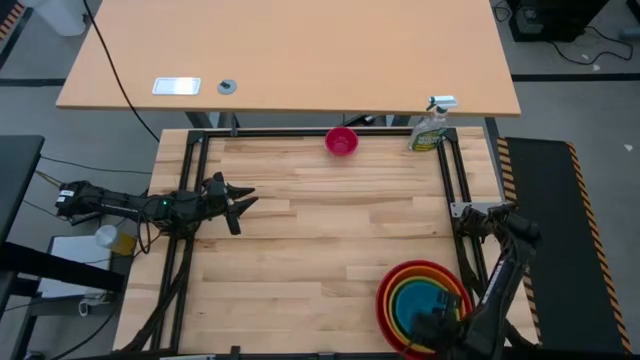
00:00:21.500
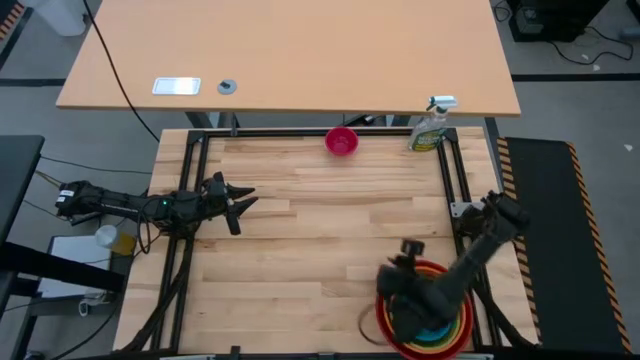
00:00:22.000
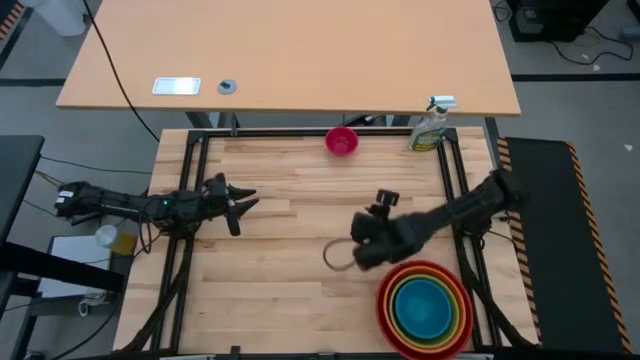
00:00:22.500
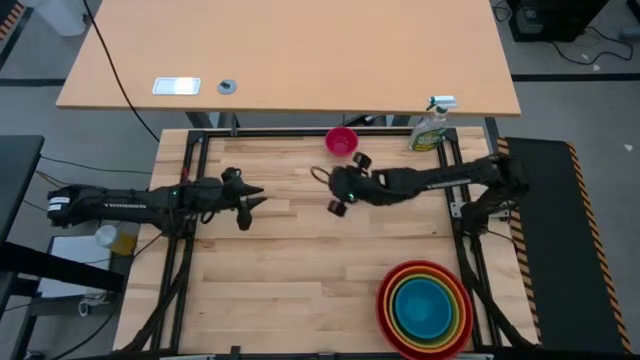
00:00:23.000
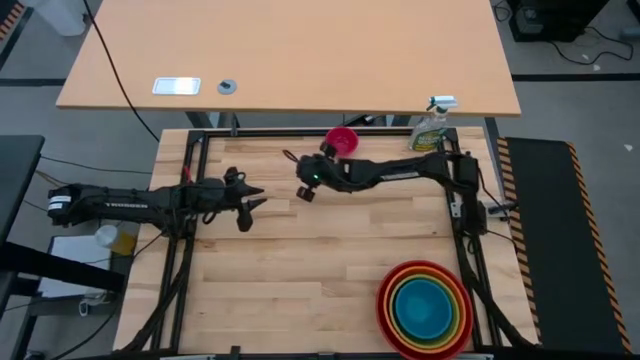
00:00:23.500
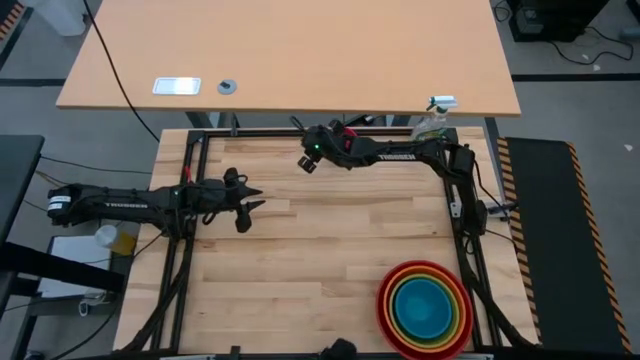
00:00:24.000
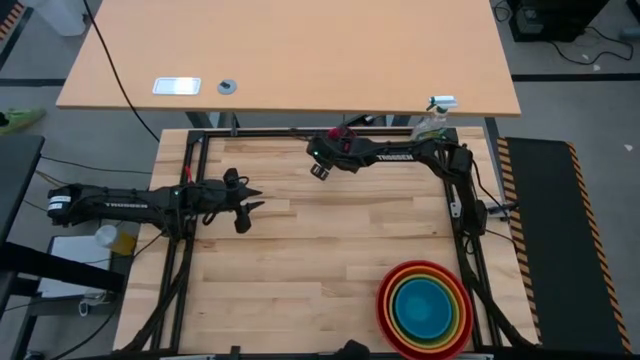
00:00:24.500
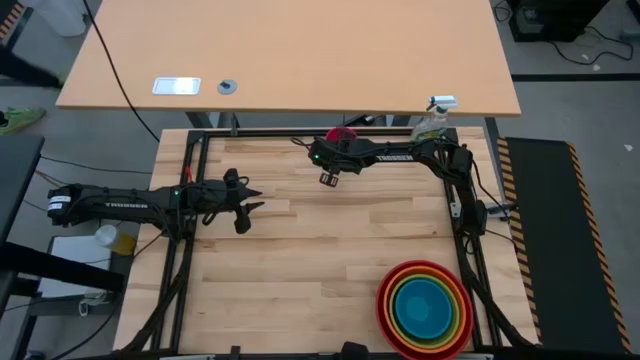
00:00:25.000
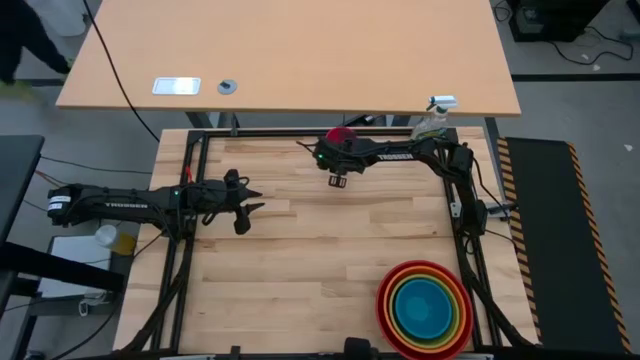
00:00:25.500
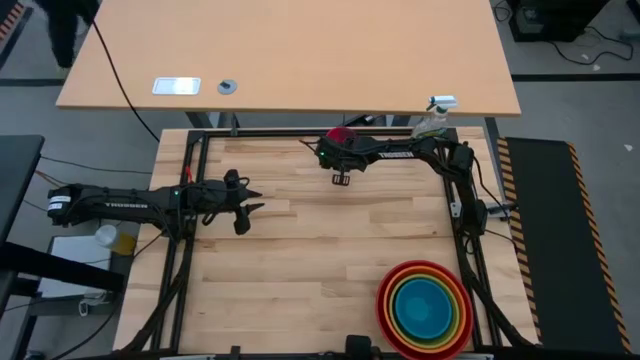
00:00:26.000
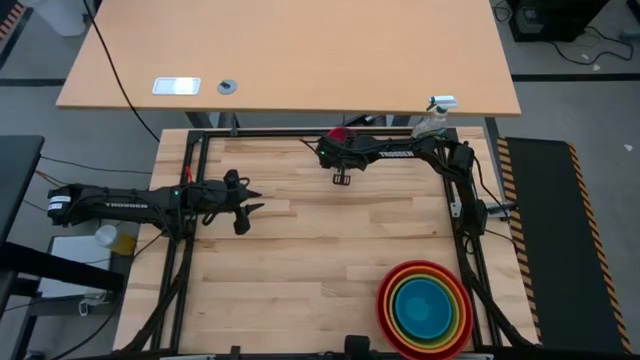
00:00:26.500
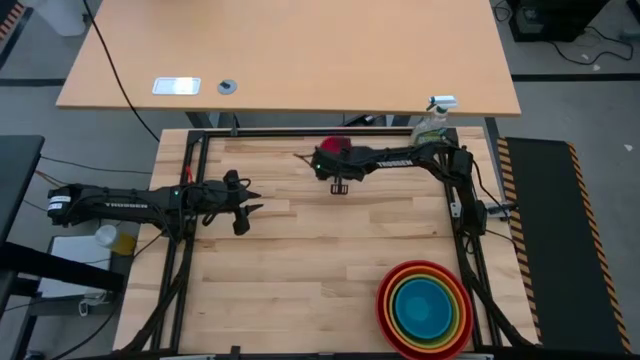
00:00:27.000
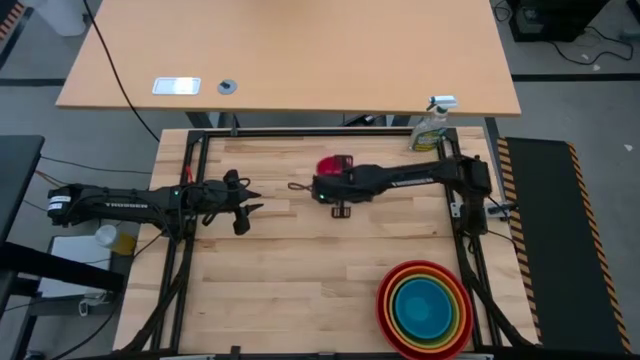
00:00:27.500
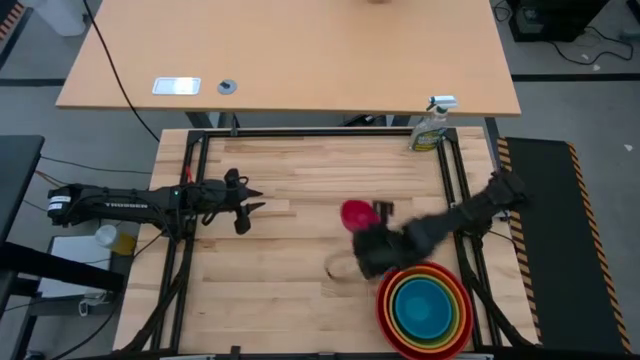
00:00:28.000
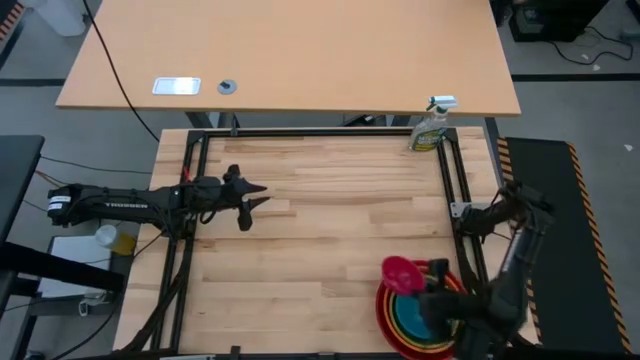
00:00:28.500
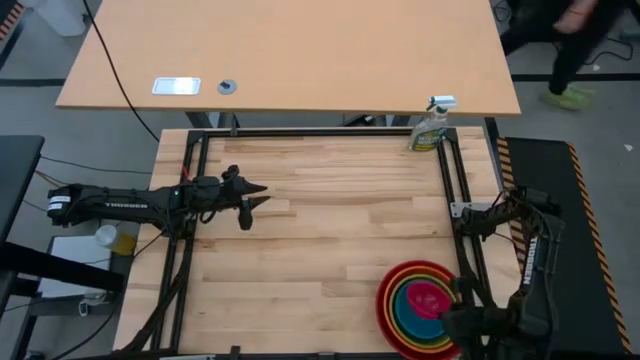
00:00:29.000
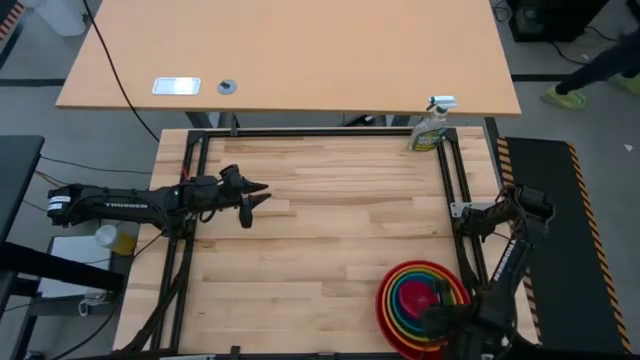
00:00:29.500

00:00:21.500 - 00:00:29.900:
Stack the pink bowl on top of the blue bowl

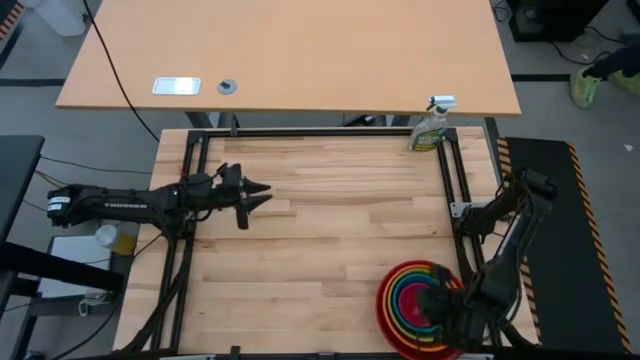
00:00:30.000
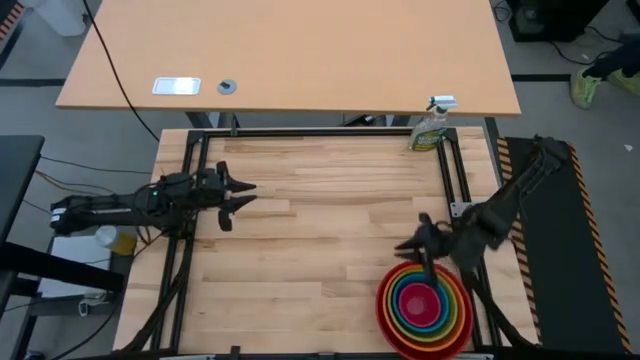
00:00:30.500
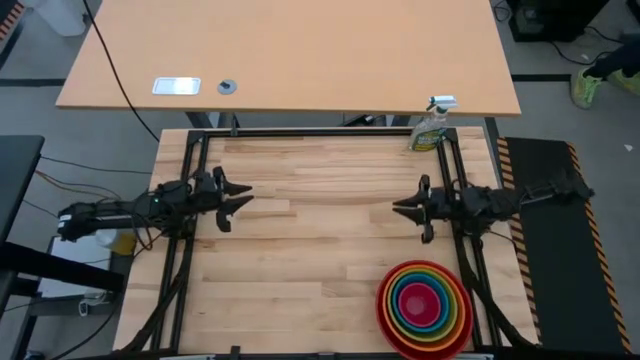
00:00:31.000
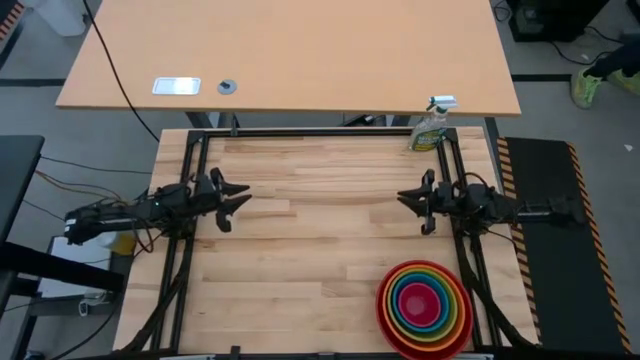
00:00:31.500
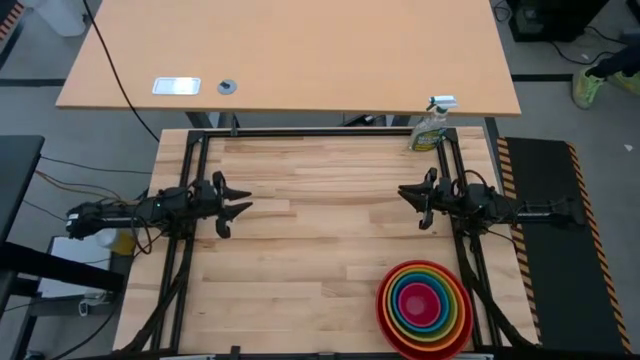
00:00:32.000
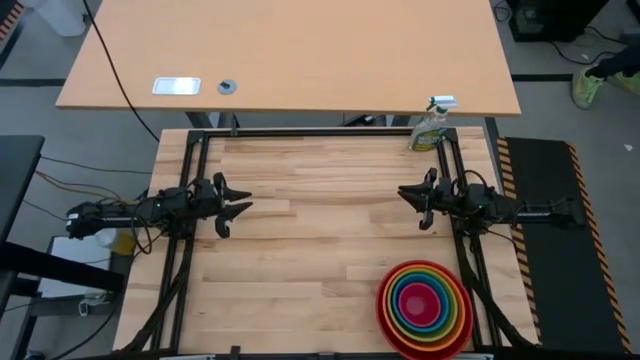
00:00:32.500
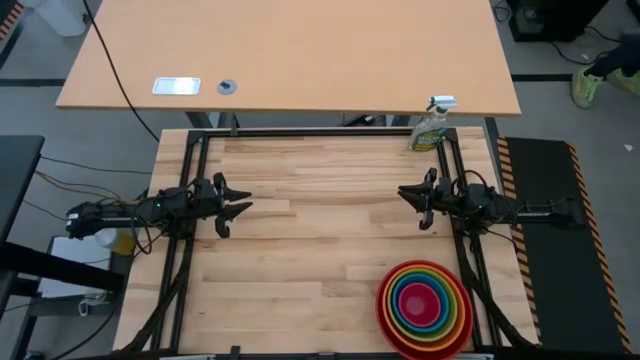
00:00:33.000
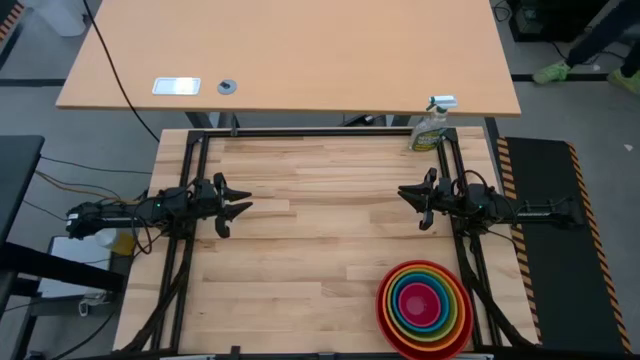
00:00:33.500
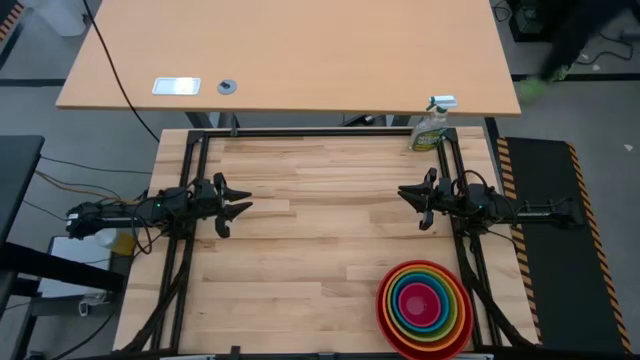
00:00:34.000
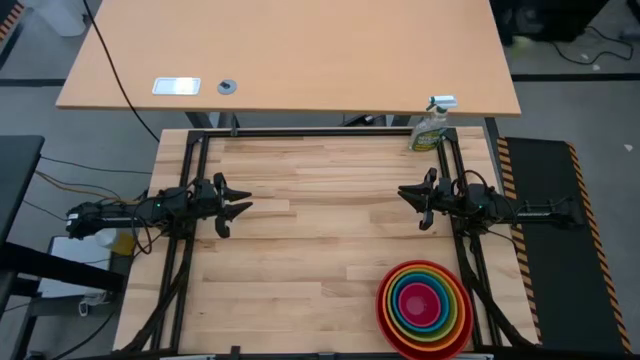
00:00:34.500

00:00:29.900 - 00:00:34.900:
Return to Home Position

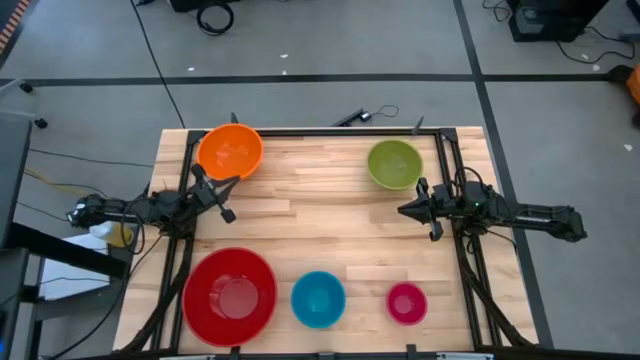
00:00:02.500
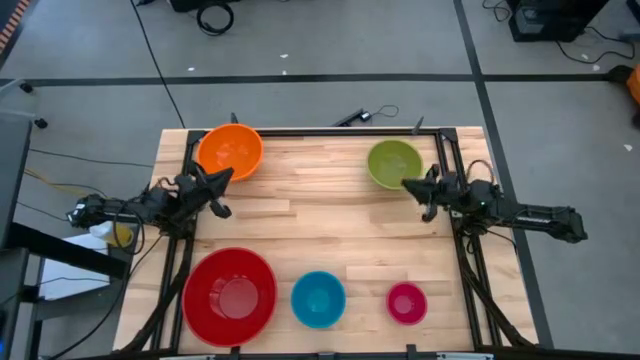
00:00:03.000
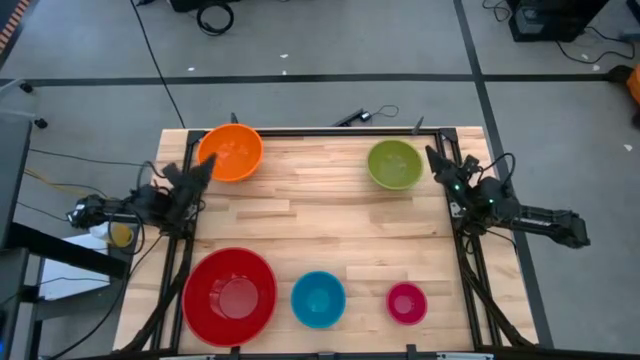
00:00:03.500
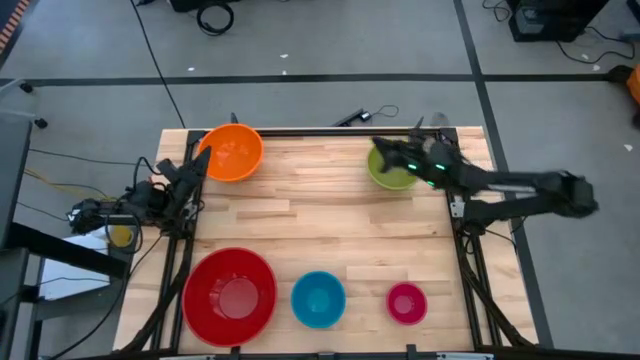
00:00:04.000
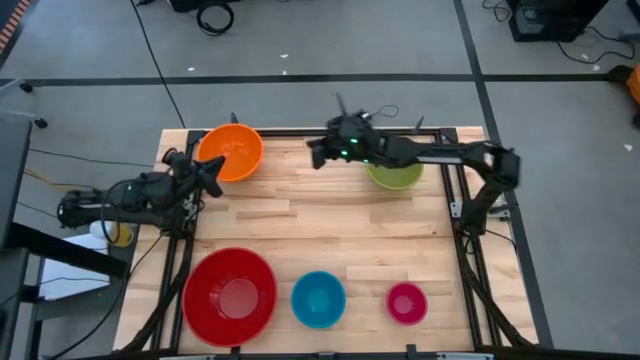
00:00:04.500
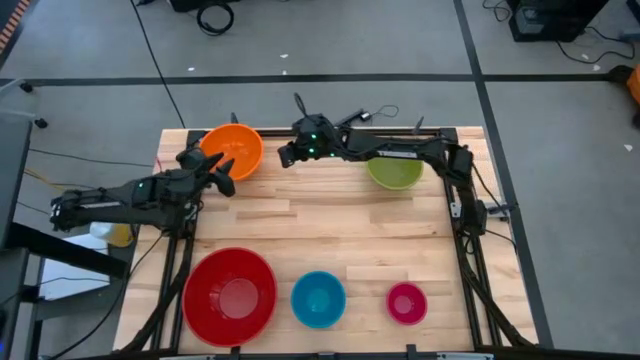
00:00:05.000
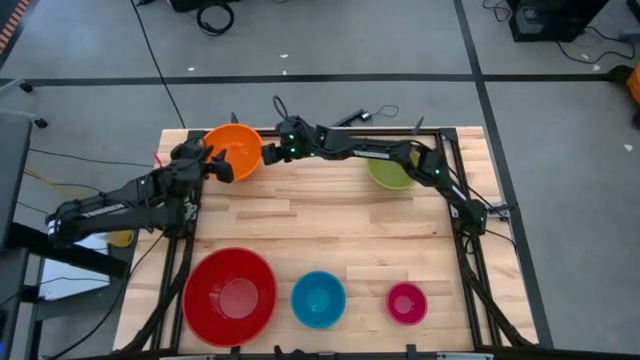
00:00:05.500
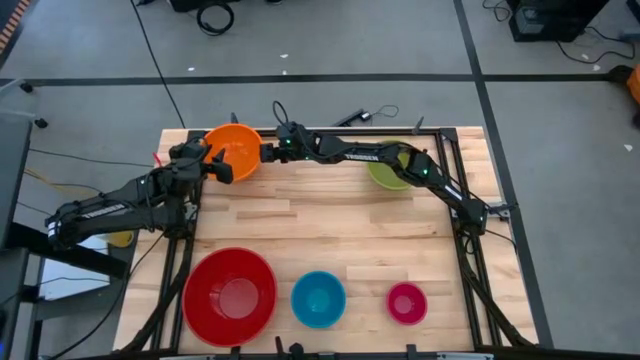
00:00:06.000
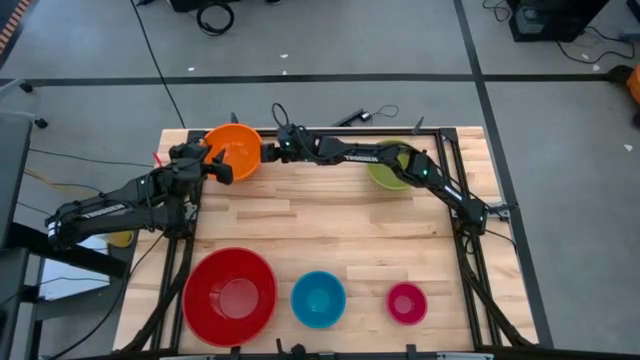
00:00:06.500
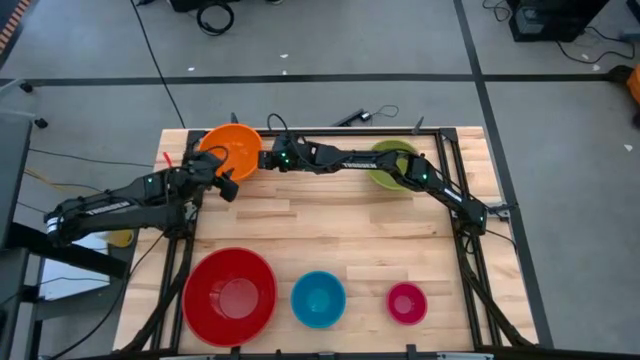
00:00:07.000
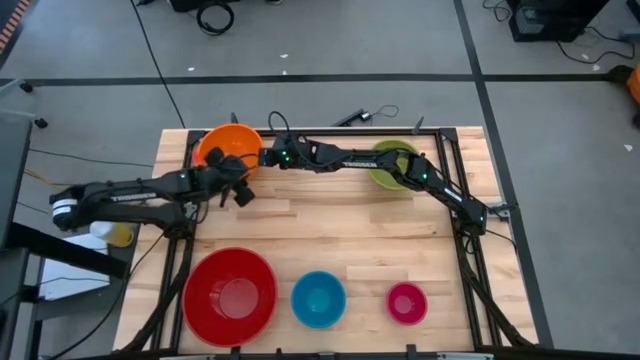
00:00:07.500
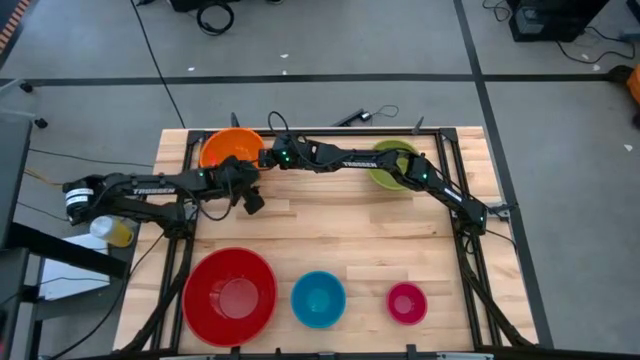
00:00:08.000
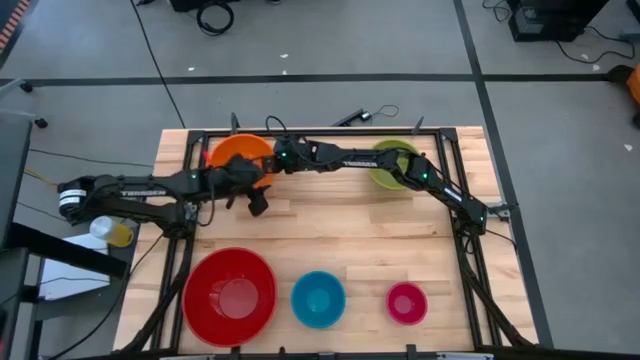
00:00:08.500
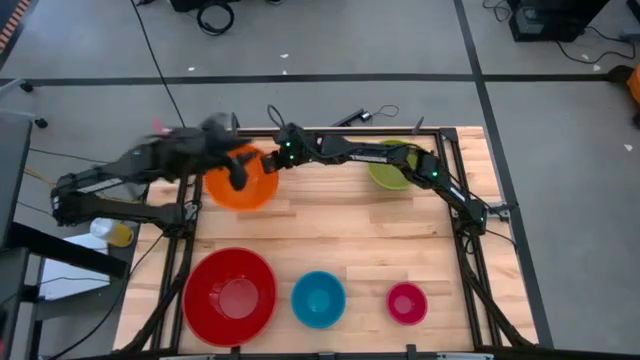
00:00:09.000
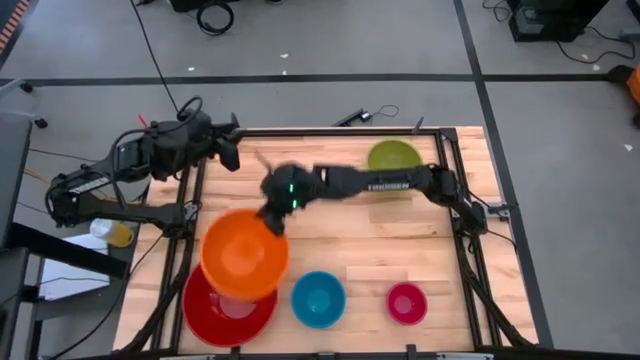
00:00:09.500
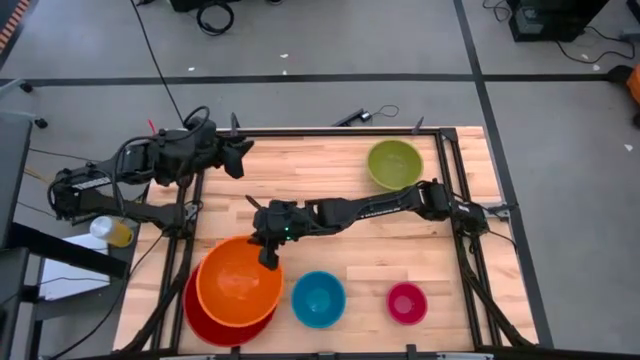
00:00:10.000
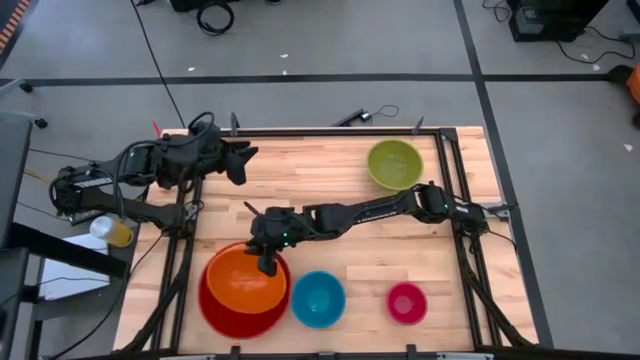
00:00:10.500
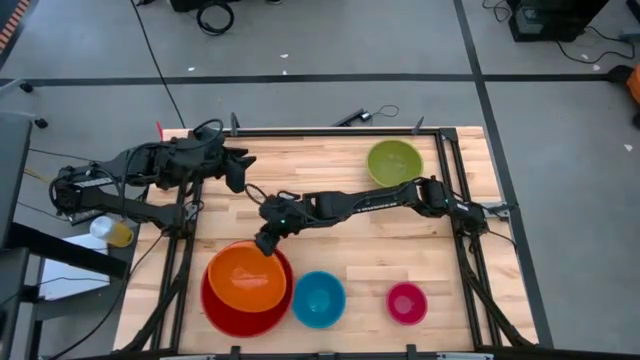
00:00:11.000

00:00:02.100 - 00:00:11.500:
Stack the orange bowl on top of the red bowl
